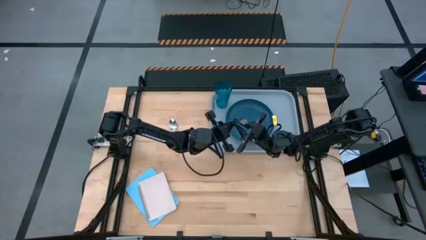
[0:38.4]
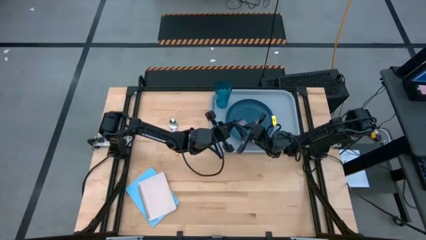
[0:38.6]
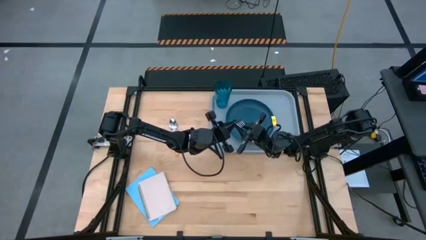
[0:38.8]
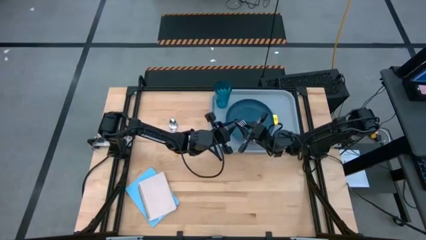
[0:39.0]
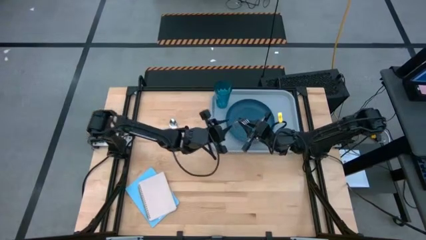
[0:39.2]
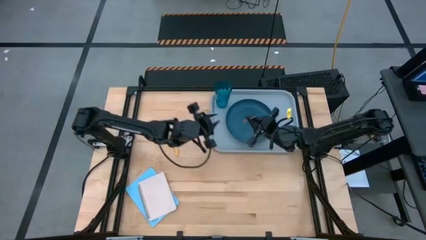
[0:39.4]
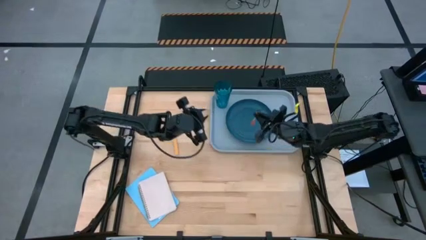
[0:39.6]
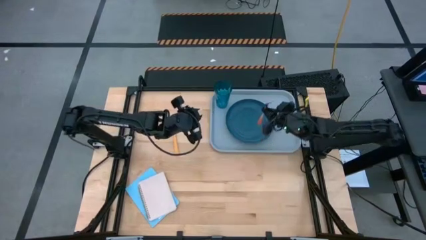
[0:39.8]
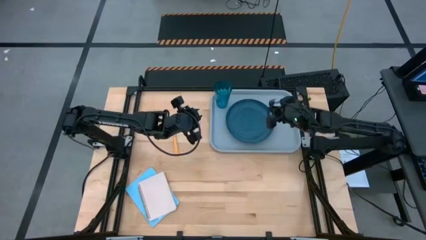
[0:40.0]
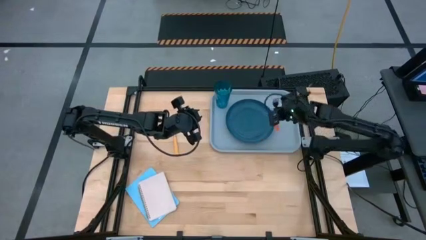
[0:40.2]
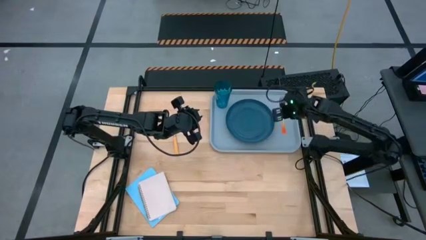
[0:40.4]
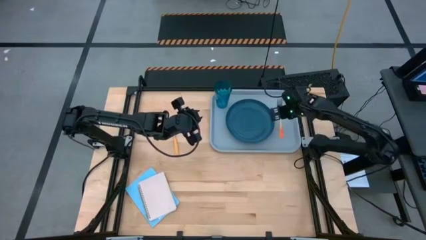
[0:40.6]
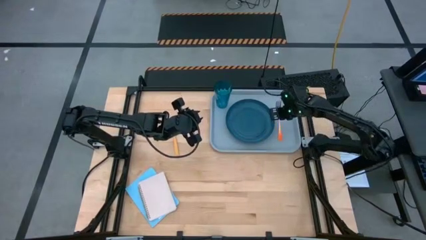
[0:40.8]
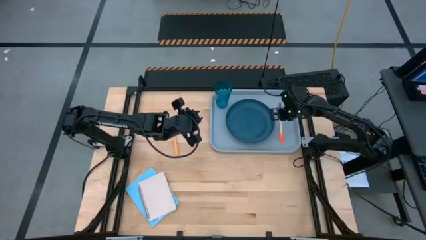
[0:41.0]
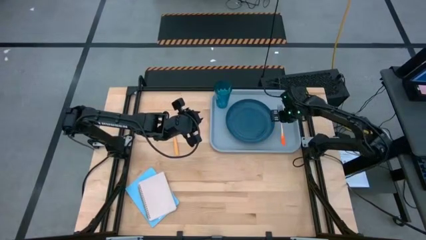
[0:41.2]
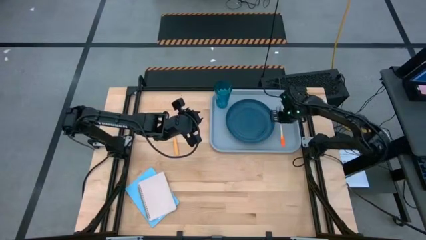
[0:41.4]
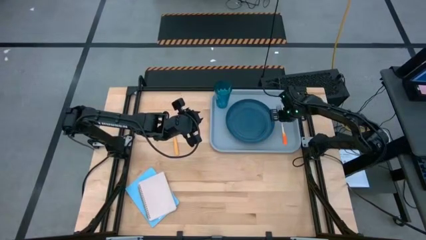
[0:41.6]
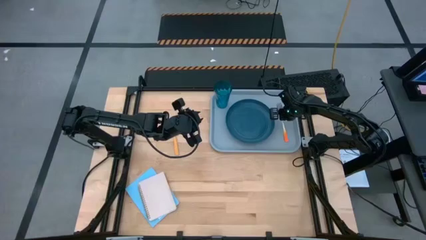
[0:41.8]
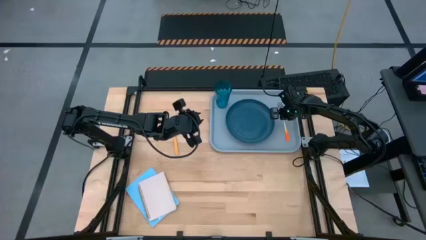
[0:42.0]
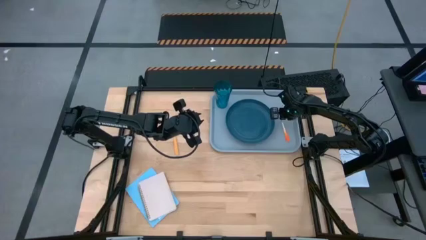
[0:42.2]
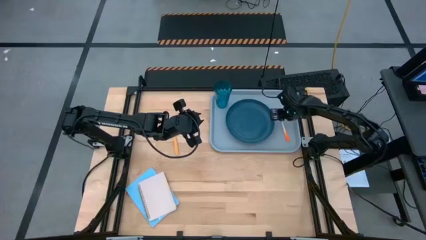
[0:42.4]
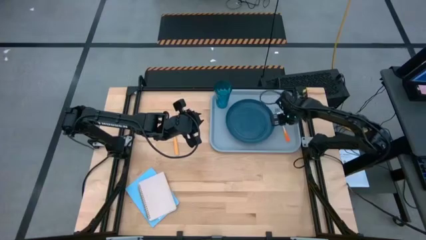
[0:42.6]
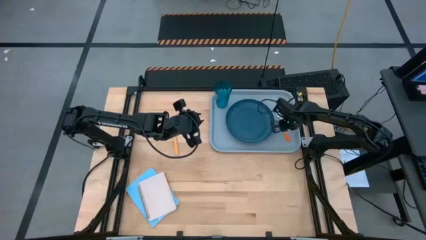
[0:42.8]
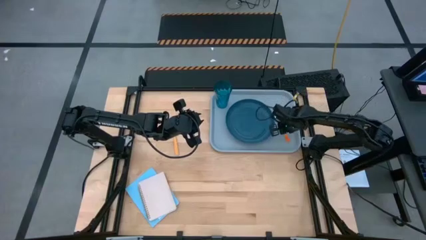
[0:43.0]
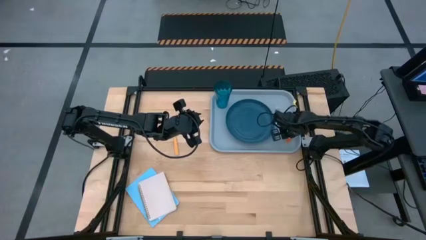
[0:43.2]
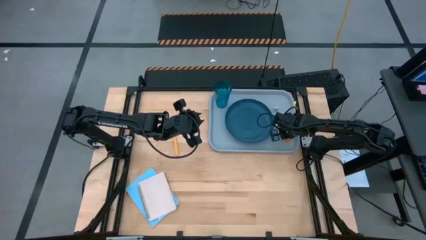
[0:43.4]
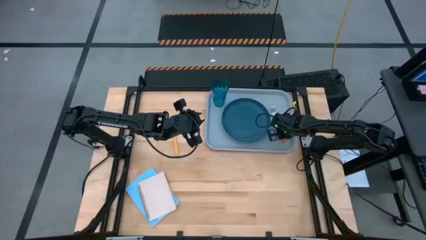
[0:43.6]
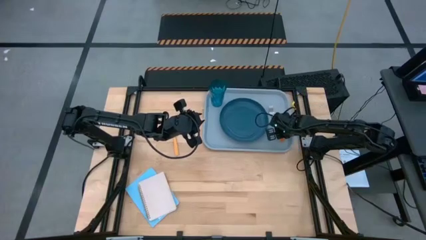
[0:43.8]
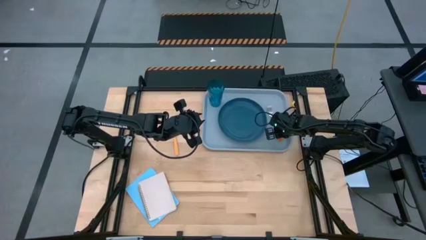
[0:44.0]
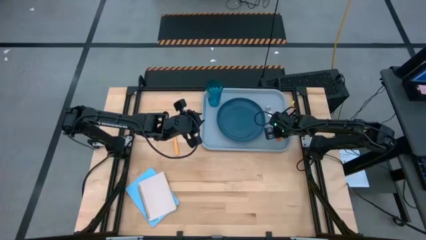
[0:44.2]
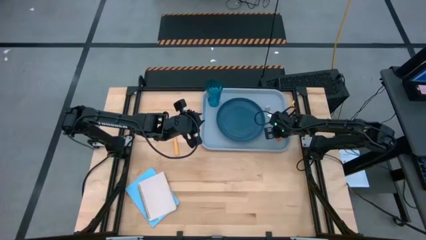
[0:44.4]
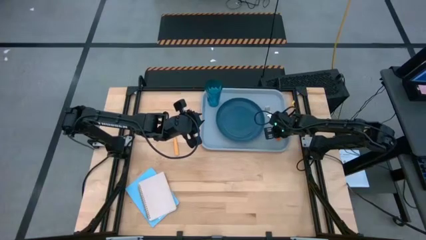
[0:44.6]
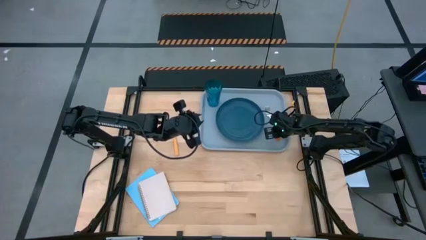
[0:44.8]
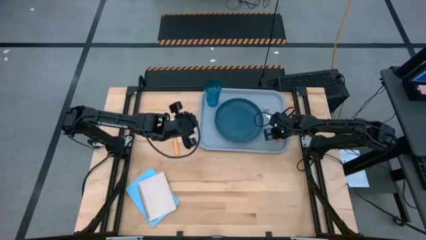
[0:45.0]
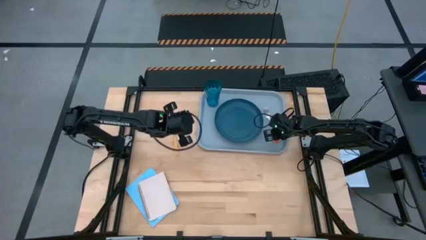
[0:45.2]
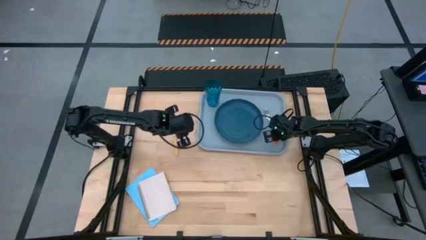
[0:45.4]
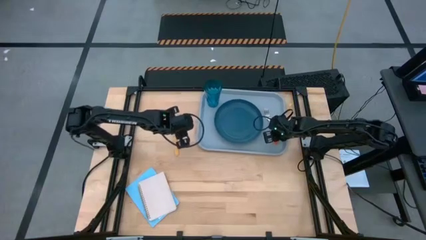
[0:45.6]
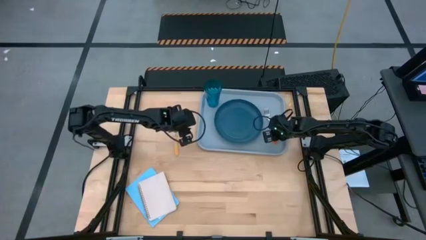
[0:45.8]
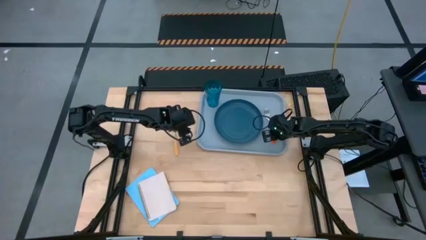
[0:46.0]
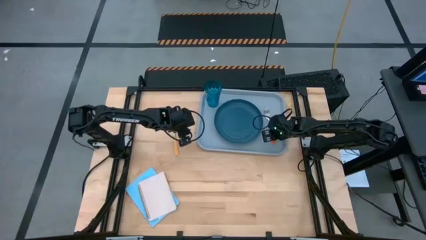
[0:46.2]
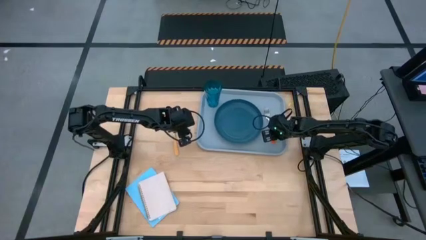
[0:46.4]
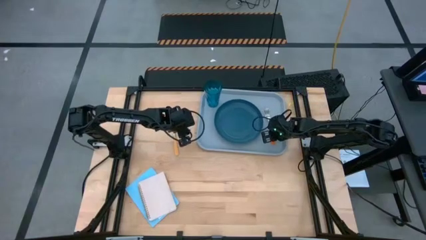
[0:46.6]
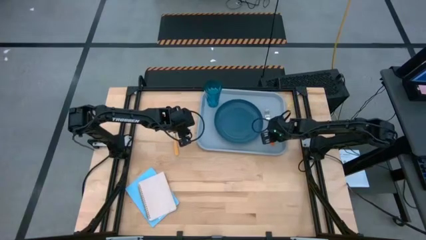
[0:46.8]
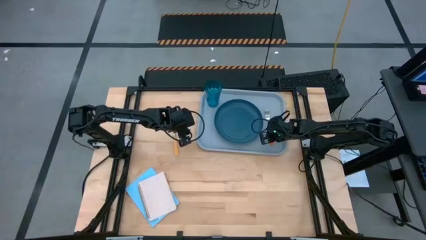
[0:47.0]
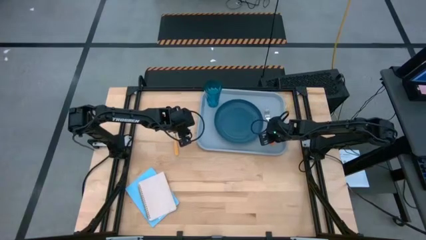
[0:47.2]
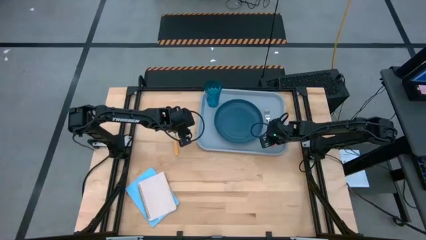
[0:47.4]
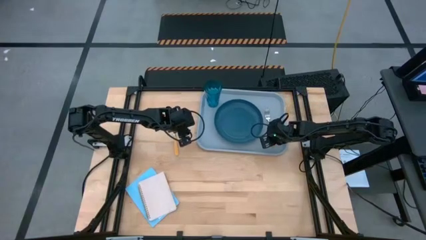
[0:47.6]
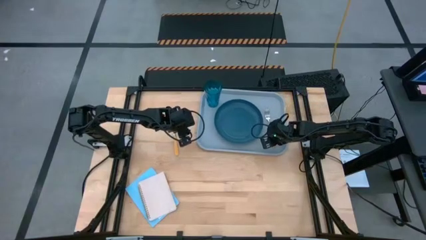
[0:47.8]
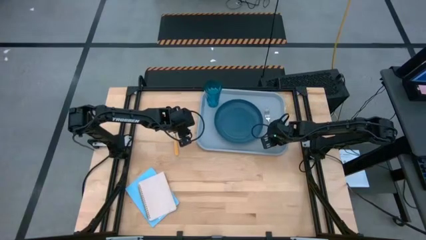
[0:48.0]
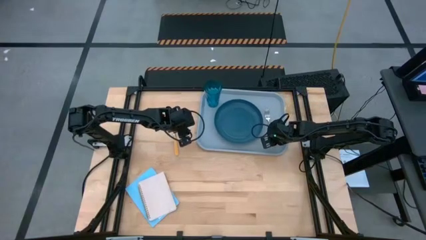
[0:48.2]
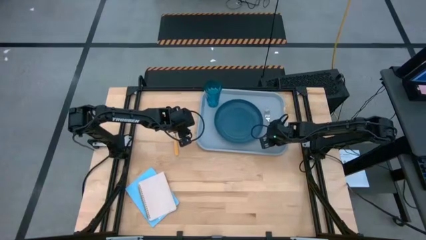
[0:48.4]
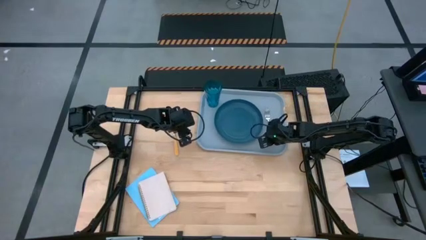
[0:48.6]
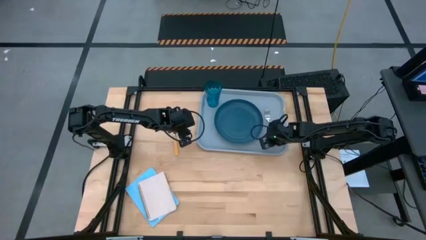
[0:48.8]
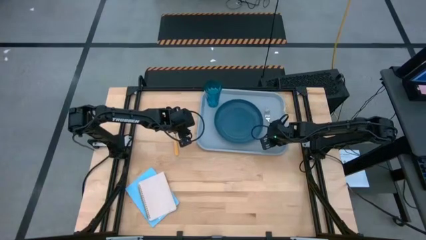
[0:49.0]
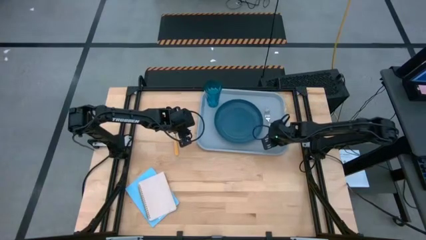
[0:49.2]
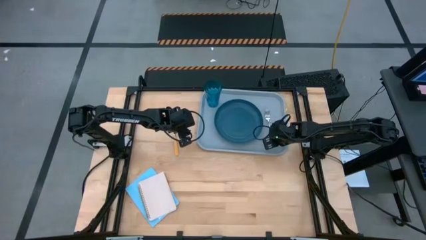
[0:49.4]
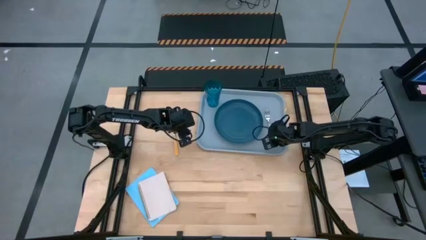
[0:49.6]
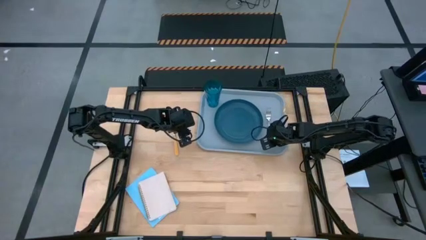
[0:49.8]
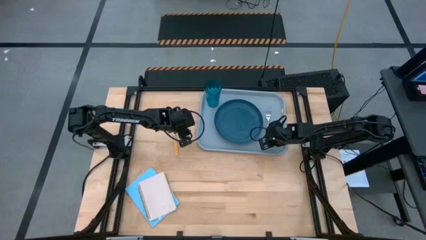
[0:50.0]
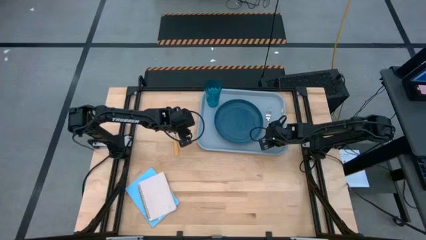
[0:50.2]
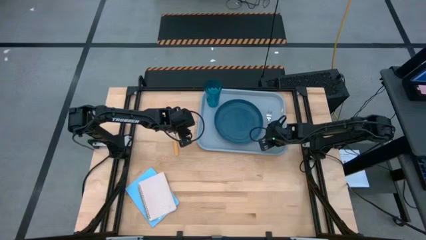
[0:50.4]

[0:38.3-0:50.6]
Task: Pick and place plate/cup/fork/spoon on tray
Put the orange fork on the gray tray to the right of the blue plate

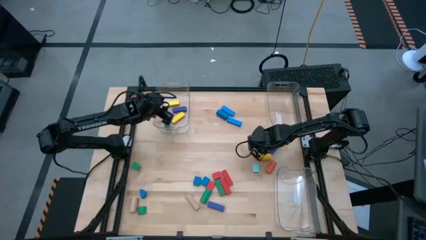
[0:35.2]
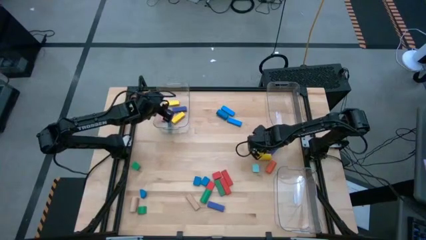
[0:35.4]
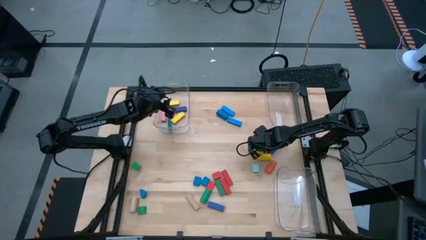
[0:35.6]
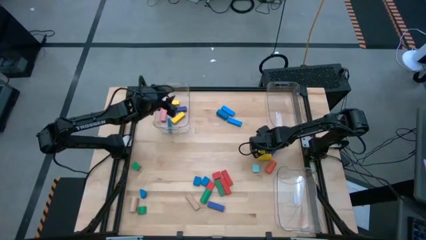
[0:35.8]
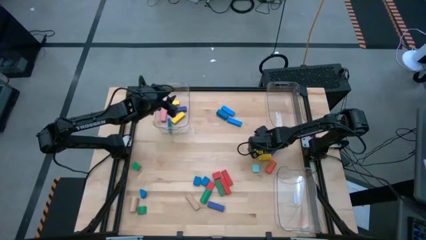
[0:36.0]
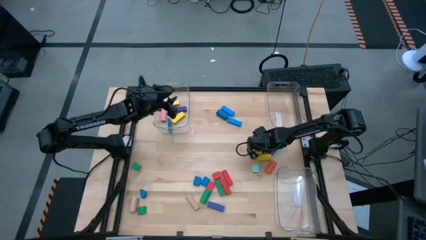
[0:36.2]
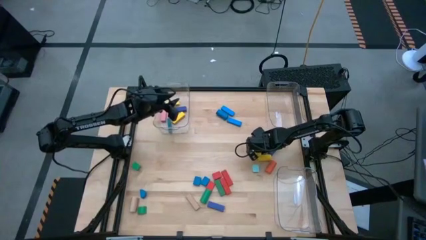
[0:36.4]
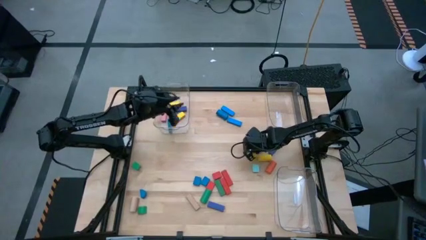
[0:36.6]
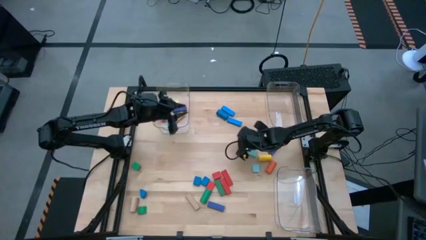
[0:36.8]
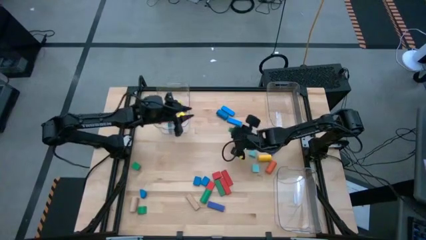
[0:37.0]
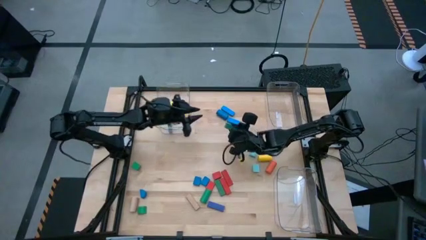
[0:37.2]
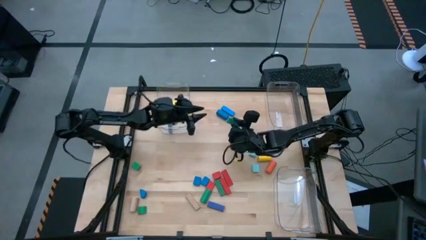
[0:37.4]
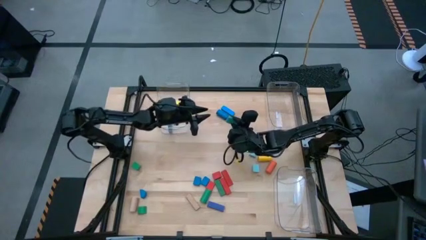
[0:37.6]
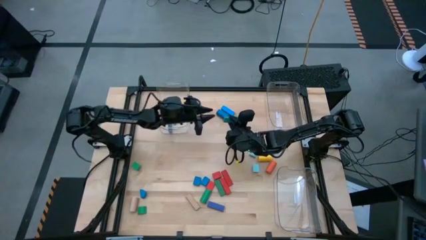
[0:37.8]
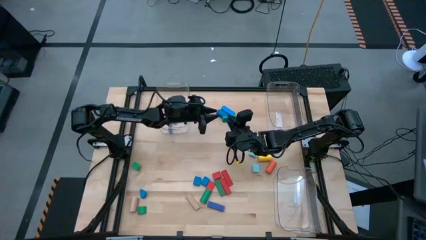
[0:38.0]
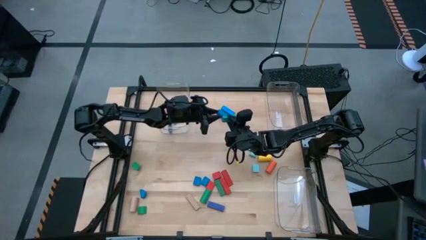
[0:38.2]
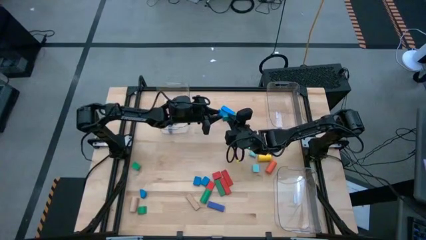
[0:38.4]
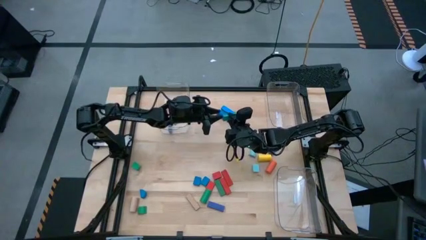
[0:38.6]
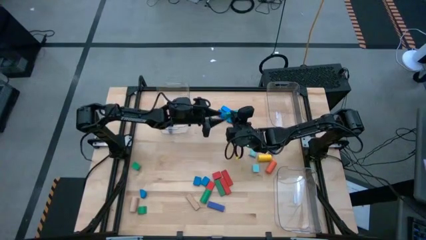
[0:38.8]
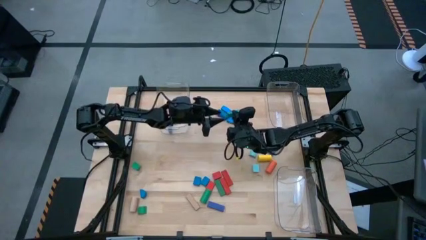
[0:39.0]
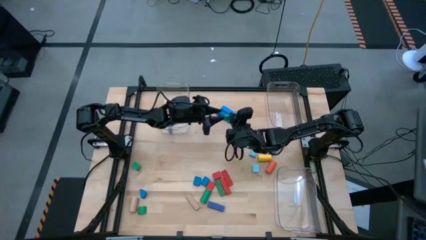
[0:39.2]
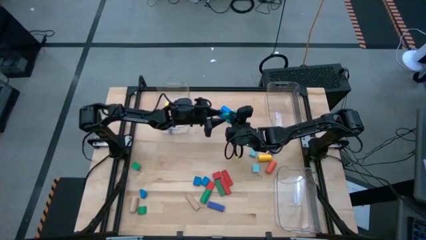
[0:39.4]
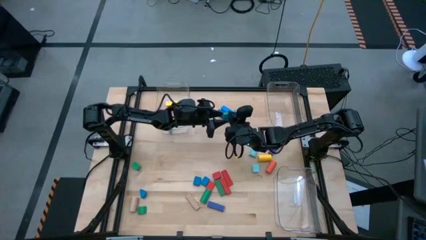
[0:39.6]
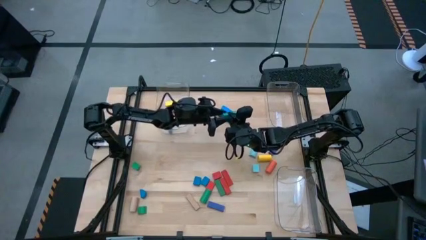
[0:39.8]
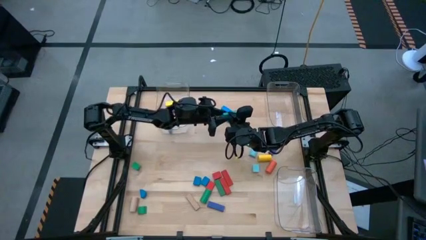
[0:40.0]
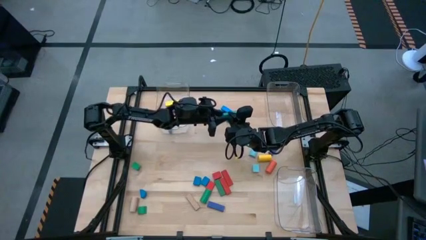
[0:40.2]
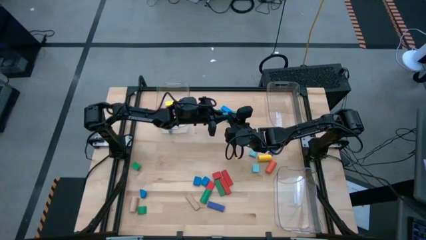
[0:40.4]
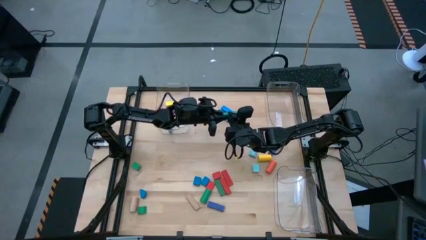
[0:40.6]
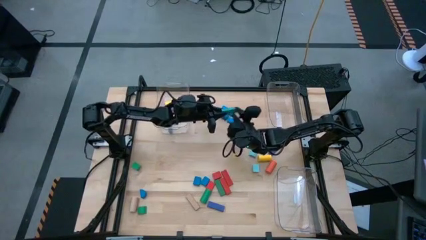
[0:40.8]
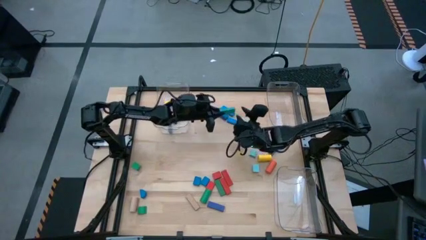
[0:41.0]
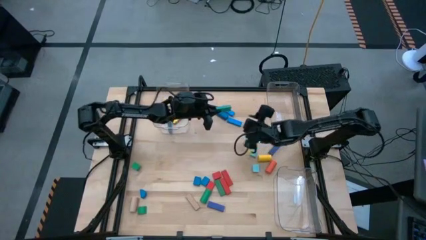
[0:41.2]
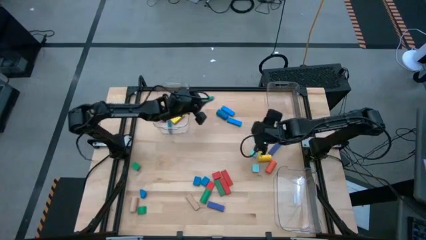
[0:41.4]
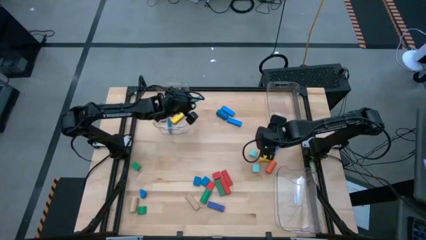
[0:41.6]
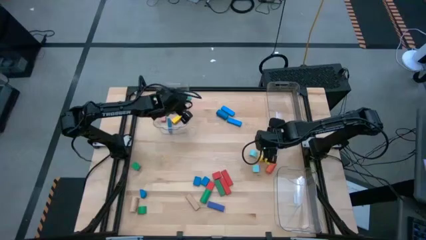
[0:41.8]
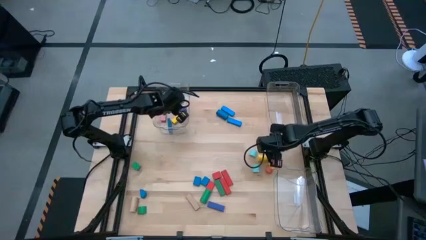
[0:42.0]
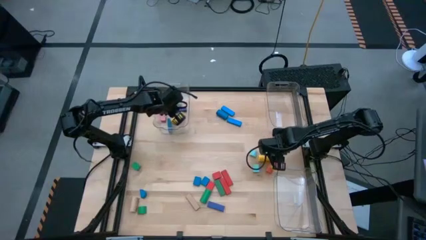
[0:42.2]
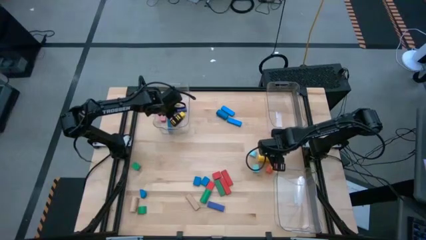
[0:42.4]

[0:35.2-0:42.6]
Task: Sort blocks by size
Put the green rectangle block into the top left transparent bin
